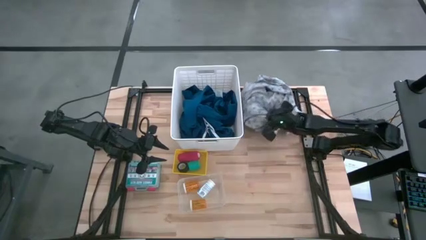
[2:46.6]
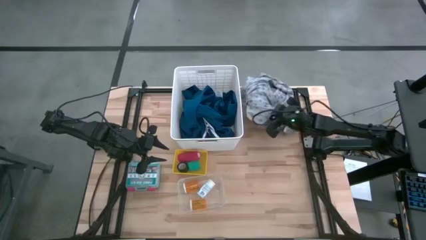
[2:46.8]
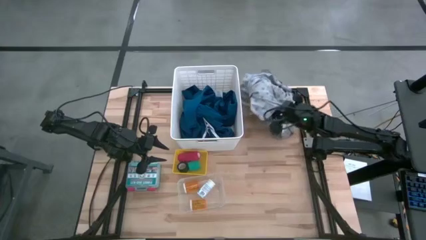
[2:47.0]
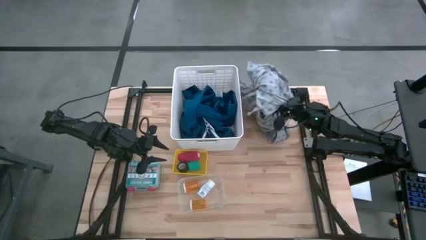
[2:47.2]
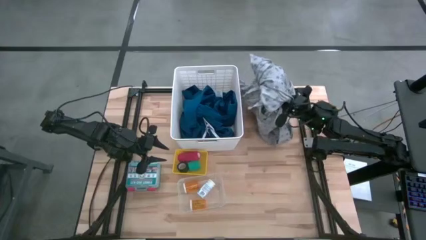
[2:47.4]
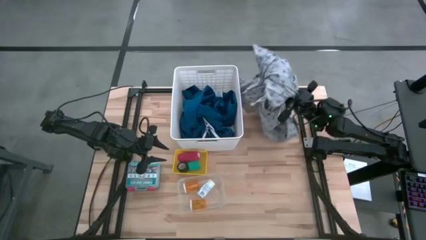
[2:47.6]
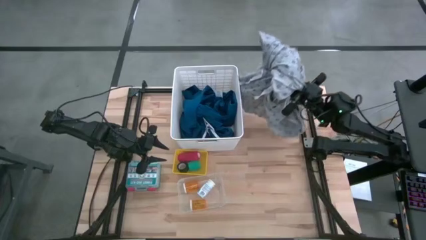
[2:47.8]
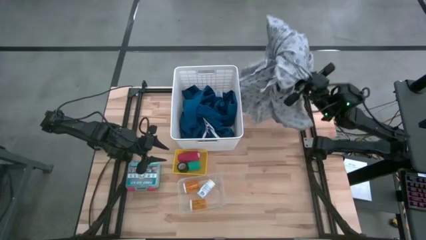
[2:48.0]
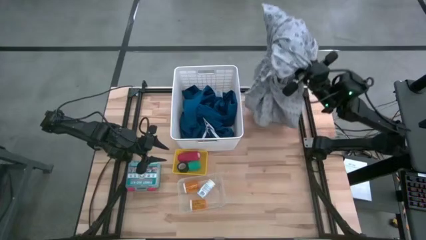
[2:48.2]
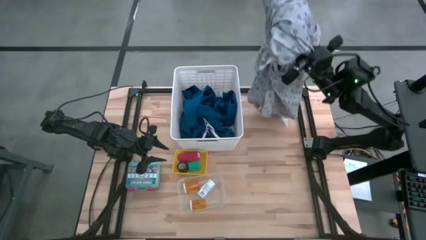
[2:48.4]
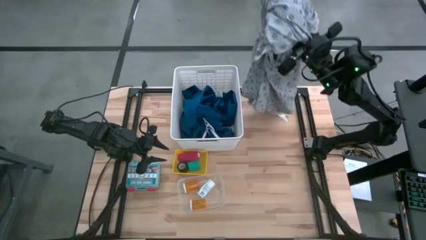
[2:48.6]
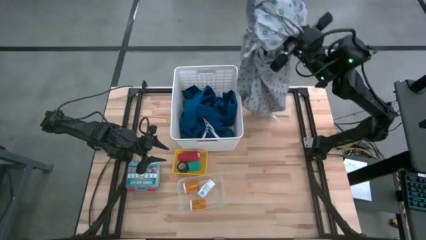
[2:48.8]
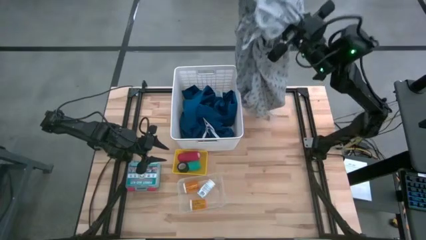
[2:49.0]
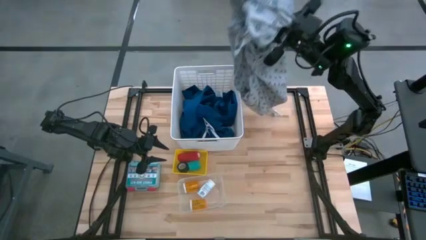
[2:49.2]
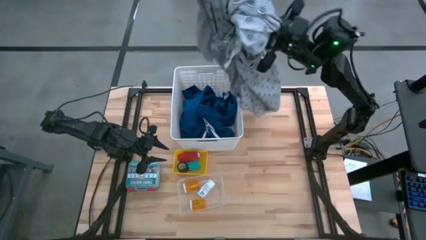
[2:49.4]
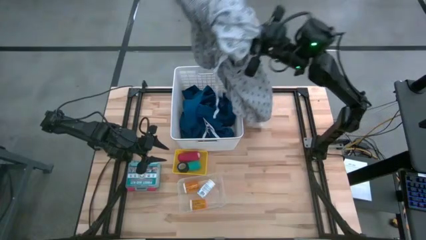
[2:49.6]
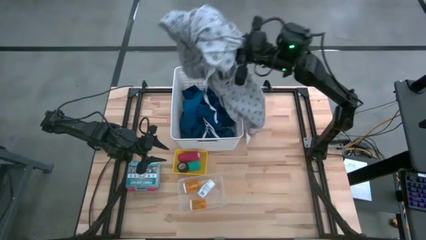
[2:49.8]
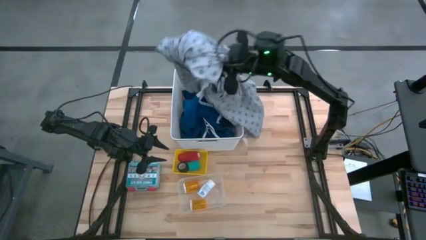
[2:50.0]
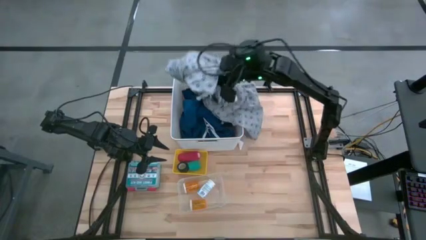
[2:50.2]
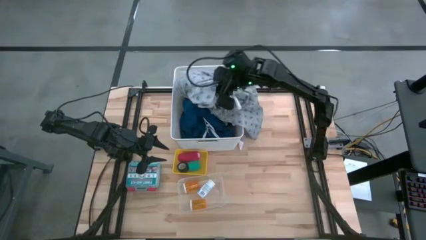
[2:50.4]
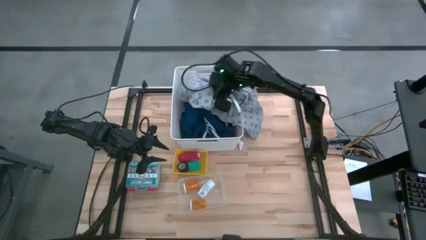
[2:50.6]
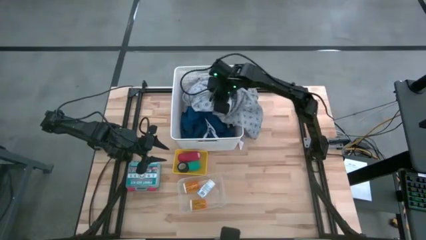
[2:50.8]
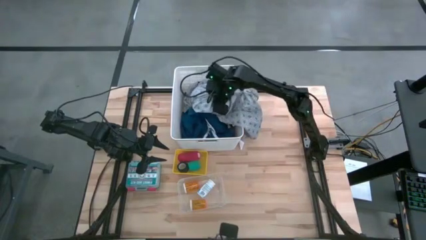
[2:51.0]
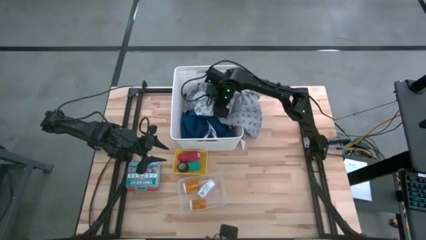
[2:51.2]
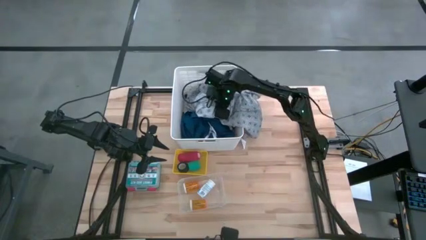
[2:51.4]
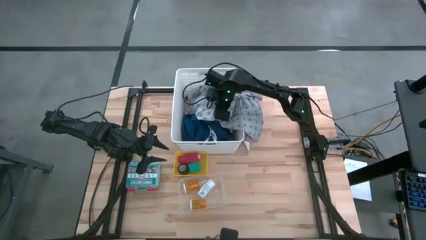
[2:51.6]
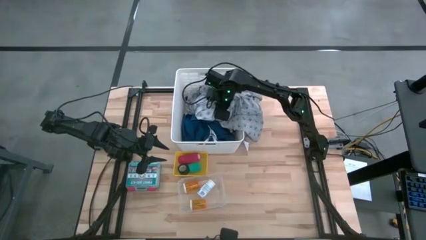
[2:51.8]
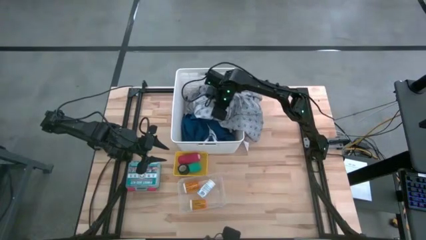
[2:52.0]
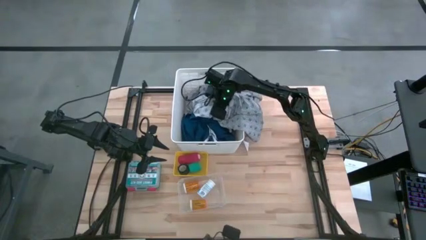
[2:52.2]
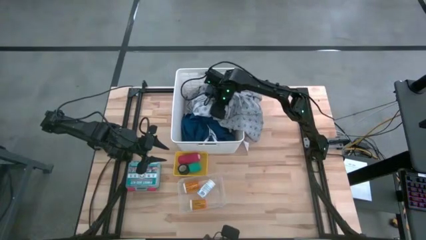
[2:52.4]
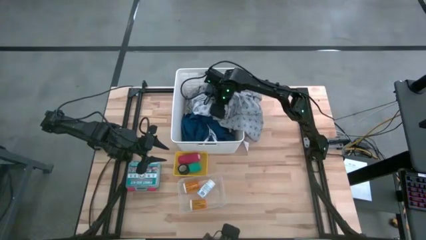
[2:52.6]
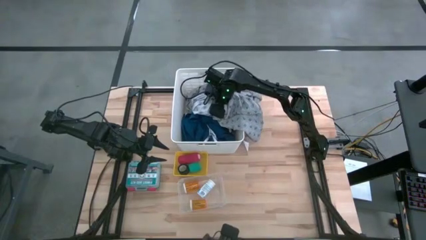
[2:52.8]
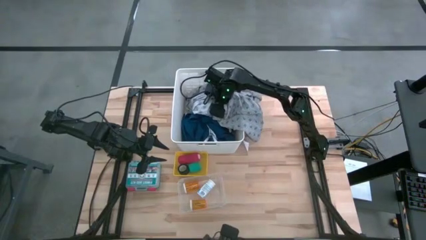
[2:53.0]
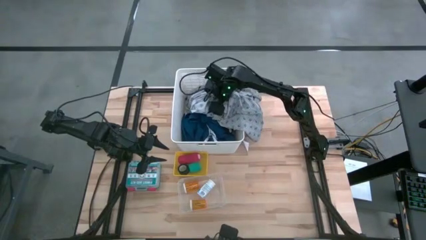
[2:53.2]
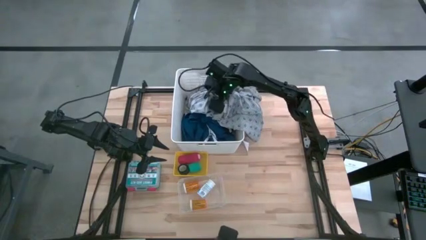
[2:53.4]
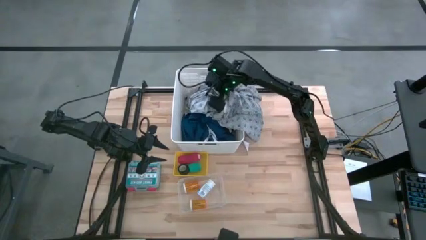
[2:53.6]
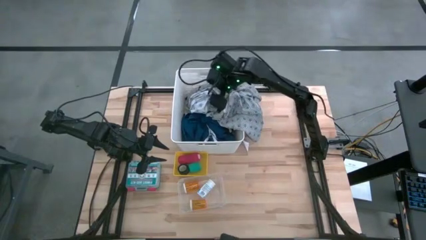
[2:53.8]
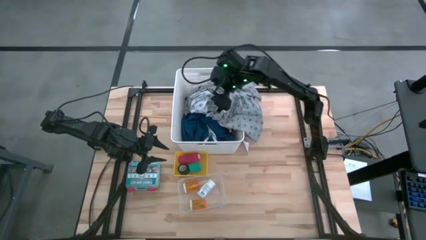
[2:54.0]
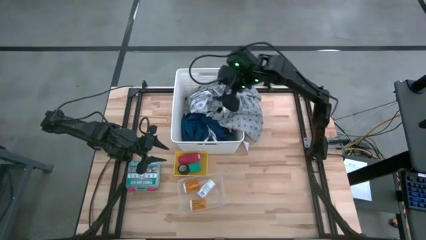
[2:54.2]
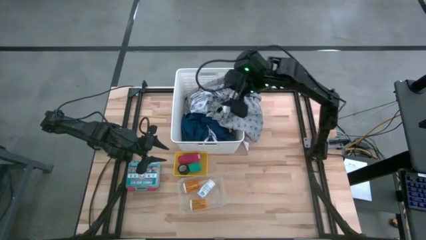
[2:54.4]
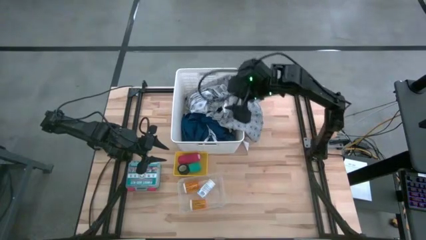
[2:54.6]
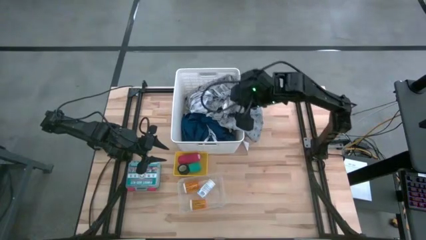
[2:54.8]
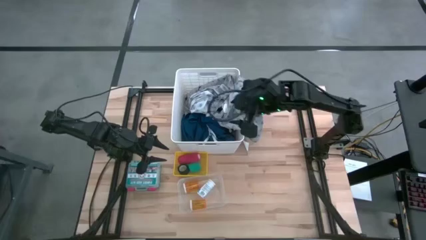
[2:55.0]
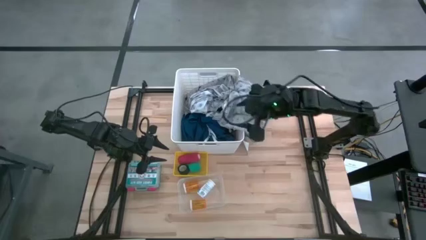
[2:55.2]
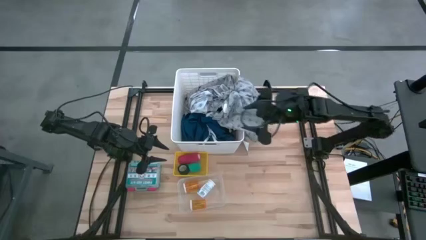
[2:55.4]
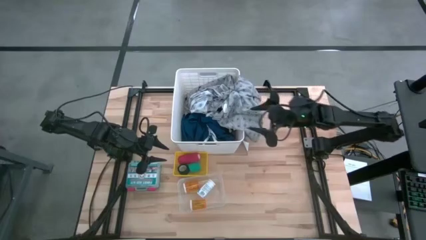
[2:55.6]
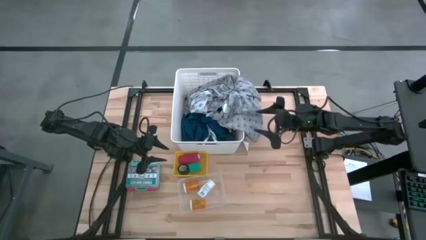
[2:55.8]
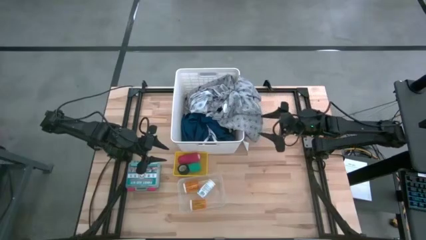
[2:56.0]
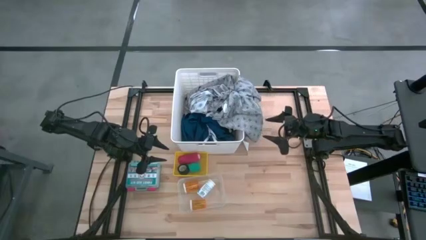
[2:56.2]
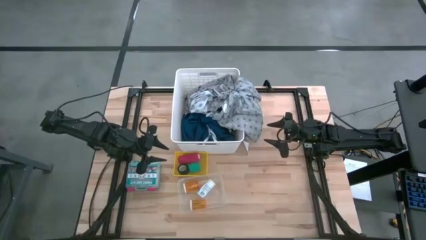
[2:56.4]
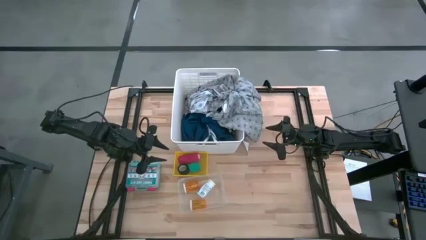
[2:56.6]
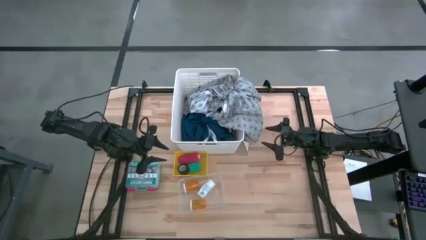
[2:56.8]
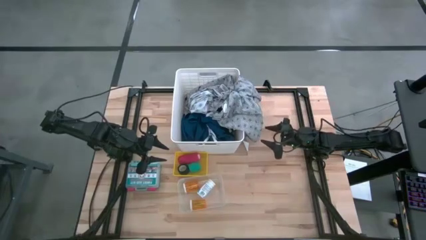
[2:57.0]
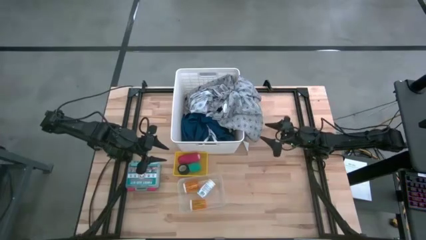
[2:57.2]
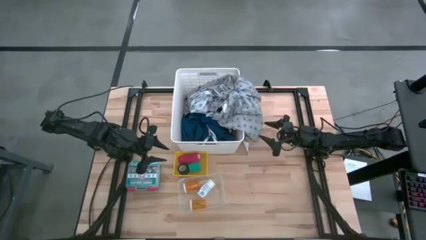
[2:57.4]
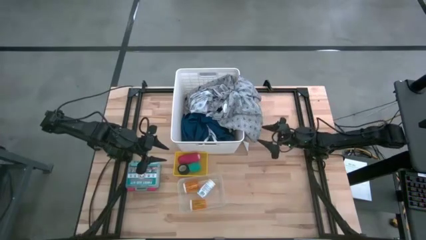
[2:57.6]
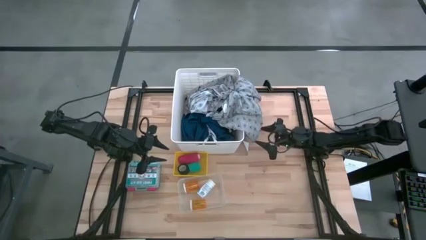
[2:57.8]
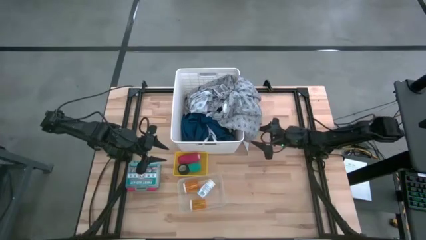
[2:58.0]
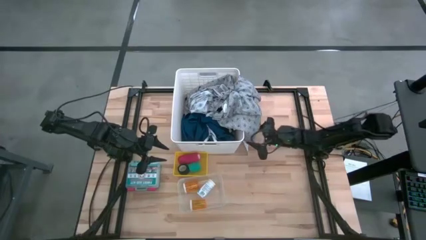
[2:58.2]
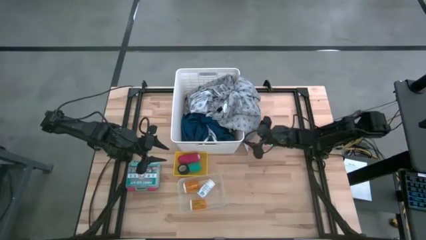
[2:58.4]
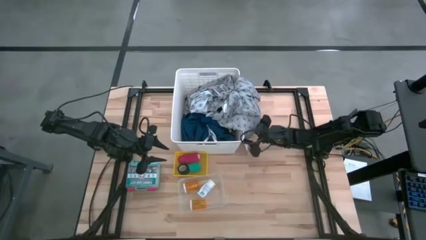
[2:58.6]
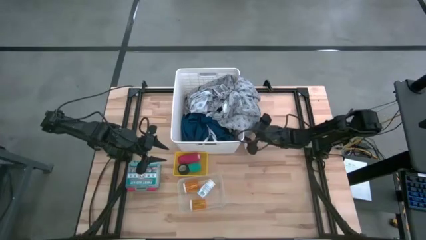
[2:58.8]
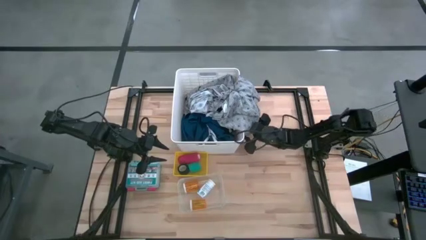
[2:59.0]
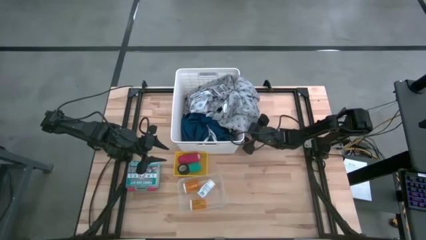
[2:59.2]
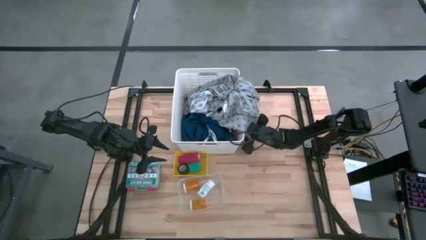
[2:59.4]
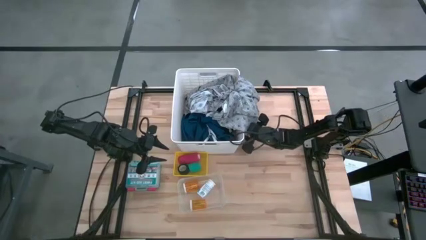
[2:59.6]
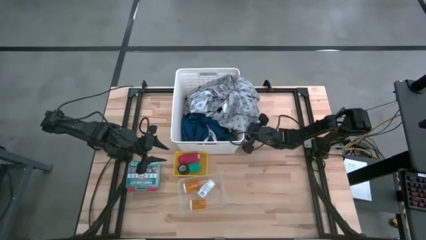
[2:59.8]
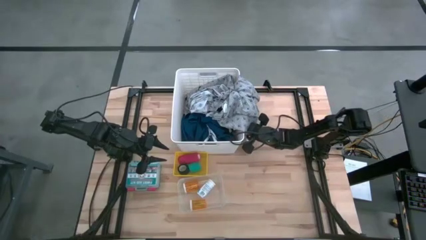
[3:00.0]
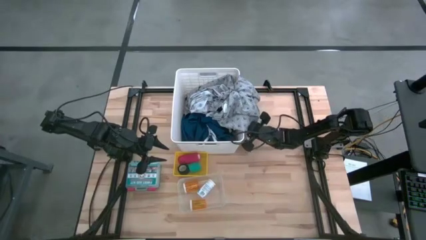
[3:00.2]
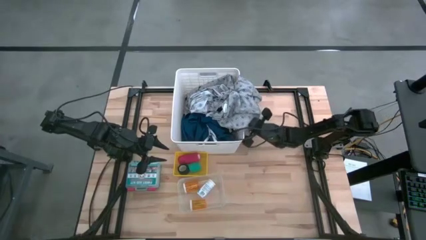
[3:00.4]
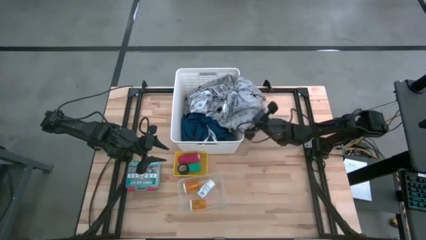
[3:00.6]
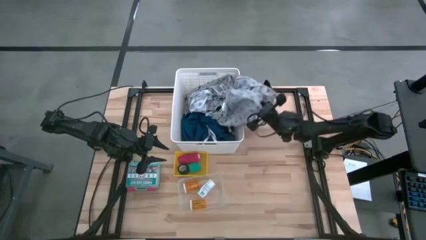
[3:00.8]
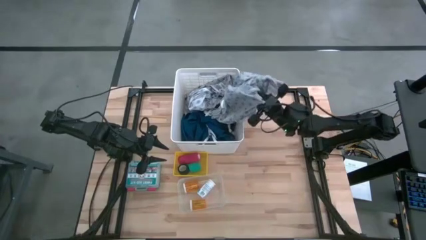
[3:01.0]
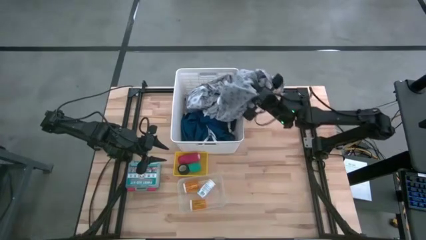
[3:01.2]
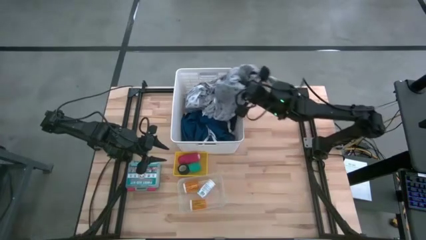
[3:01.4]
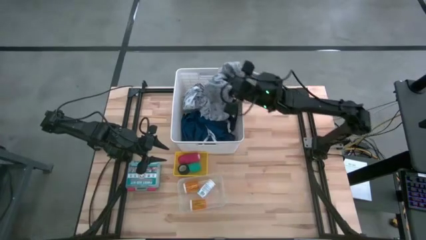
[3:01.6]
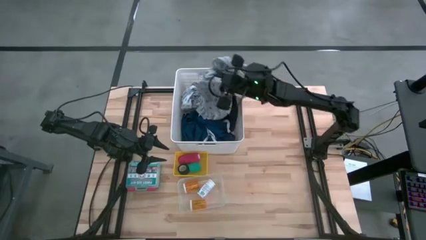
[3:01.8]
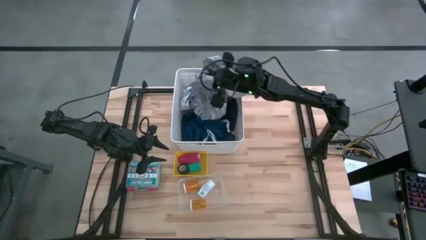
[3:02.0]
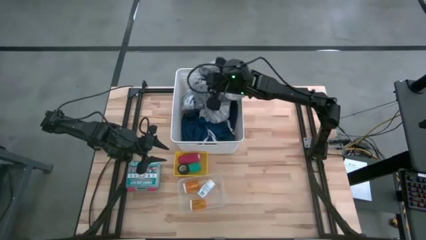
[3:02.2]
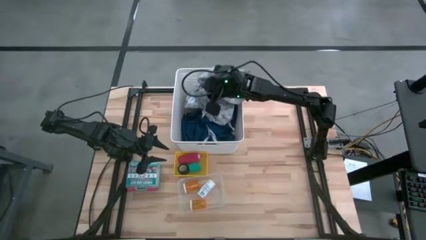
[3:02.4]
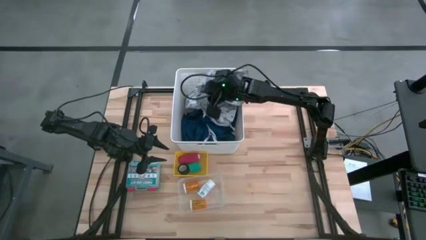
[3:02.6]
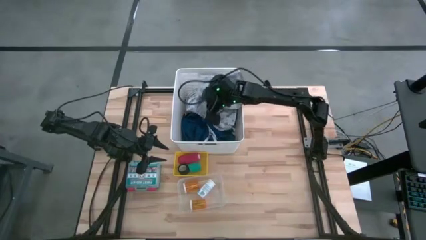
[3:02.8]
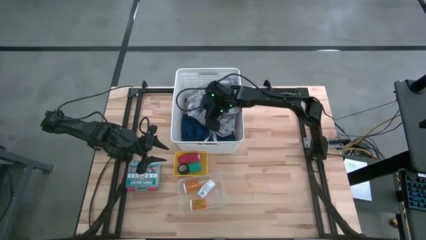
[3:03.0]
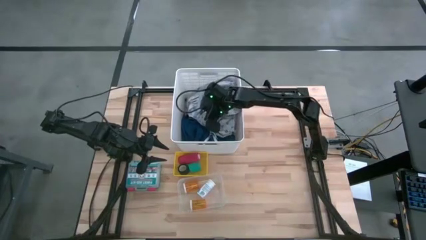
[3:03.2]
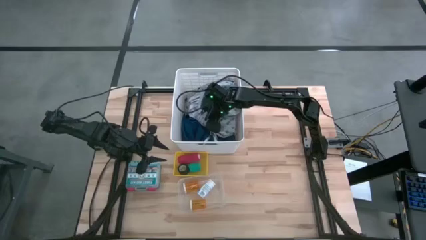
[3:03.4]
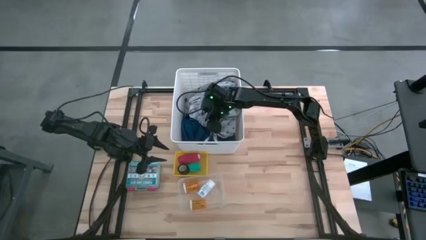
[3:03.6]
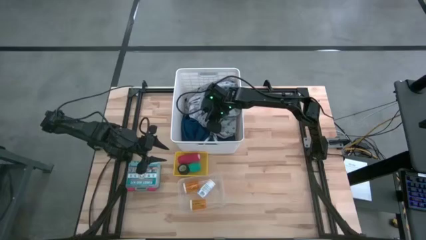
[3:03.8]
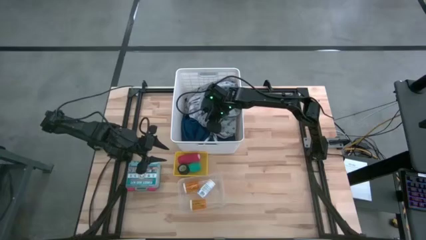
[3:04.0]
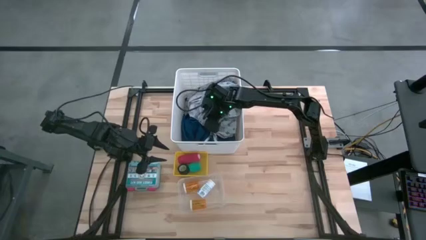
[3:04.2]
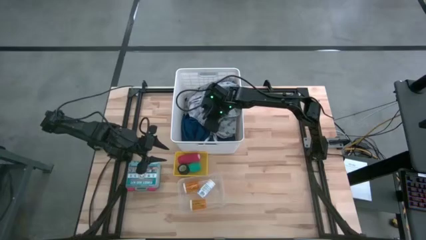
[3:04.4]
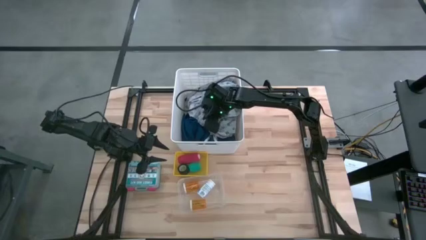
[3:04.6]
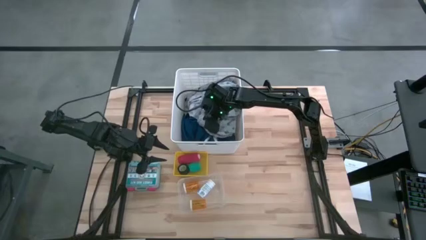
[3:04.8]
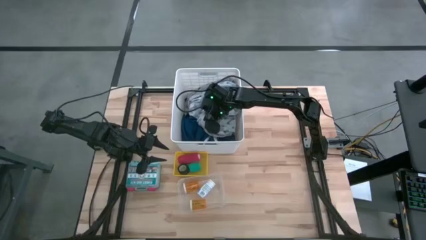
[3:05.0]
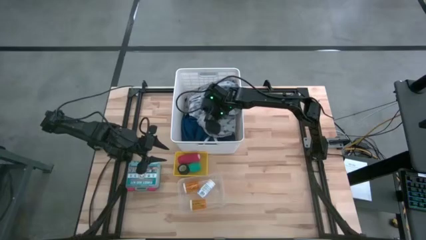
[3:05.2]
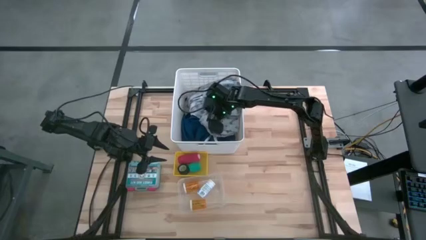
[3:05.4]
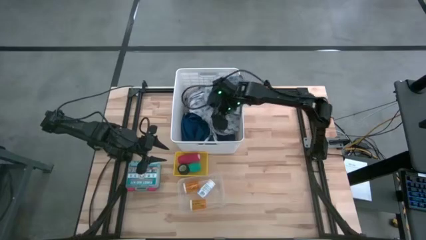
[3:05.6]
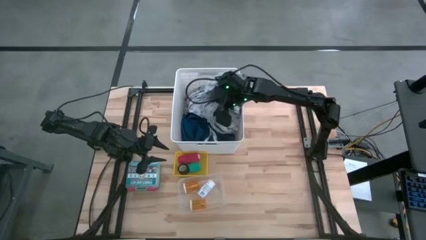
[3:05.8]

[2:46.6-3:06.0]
Task: Pick & Place Medicine items
Put the gray lapover patient gown into the white laundry bin
